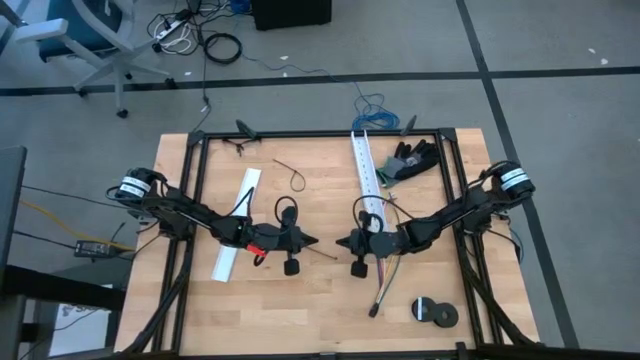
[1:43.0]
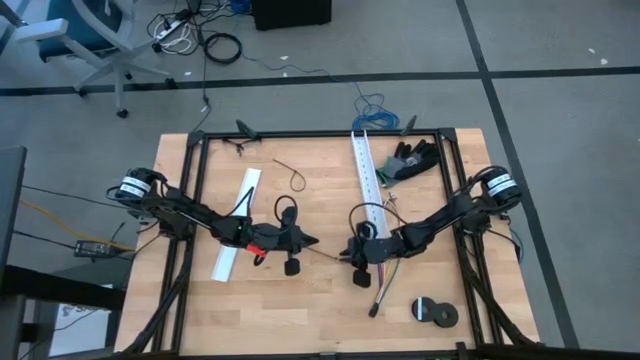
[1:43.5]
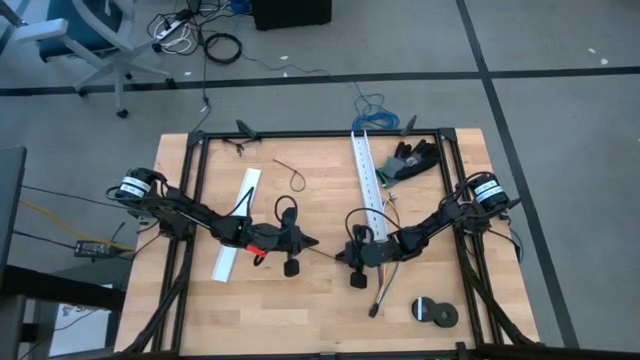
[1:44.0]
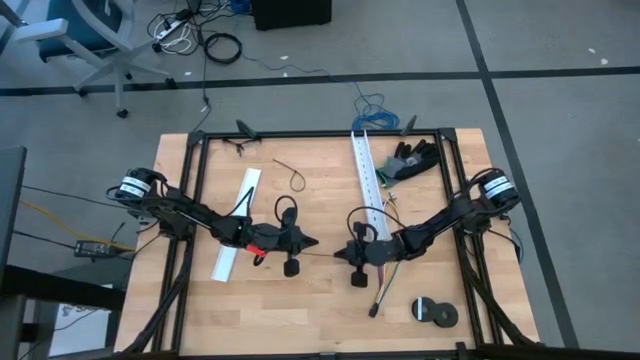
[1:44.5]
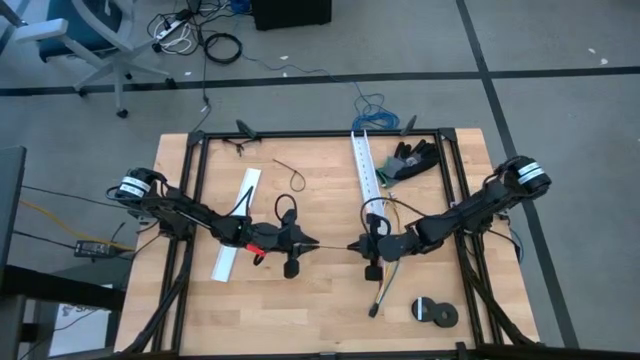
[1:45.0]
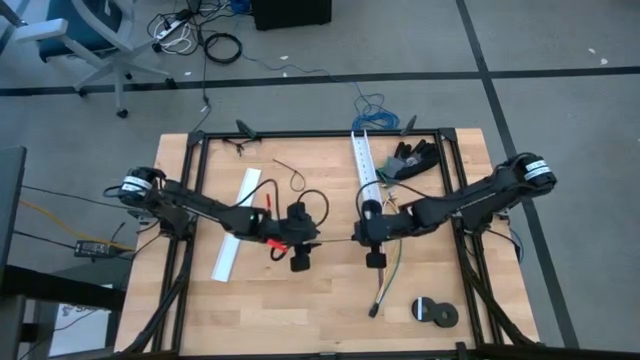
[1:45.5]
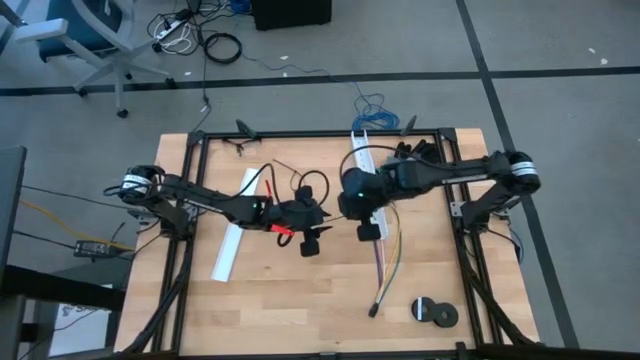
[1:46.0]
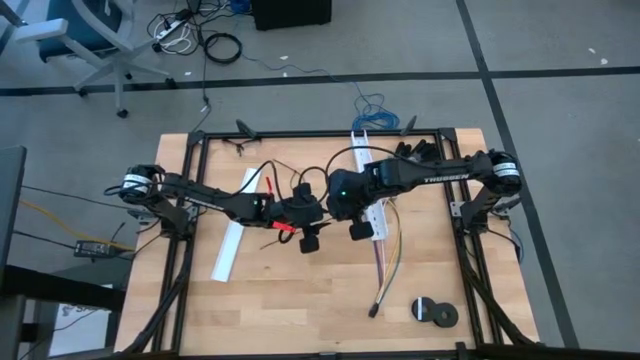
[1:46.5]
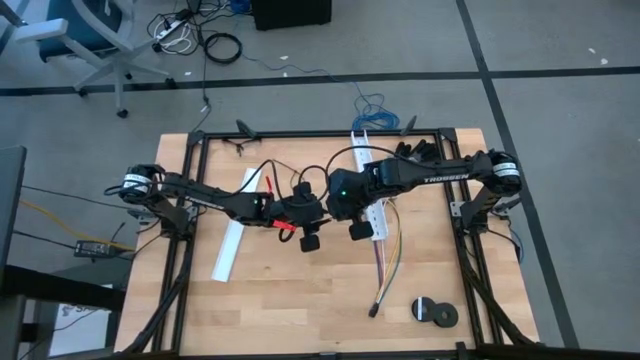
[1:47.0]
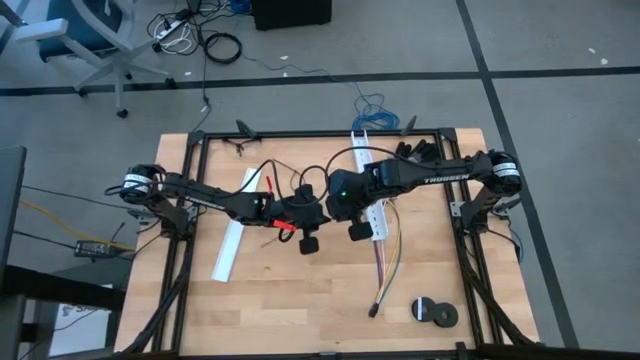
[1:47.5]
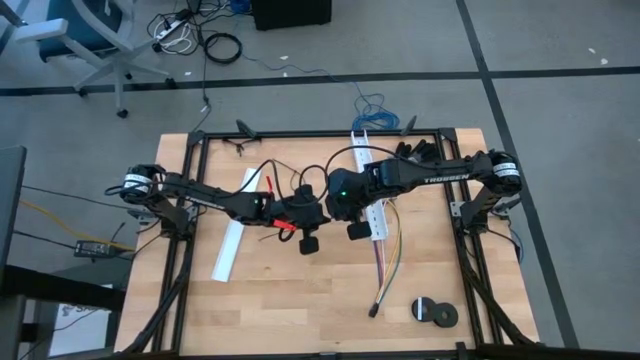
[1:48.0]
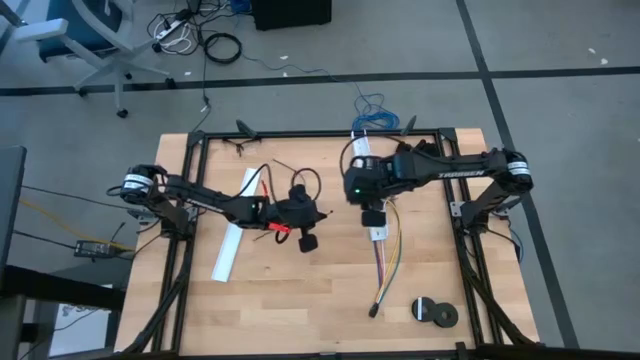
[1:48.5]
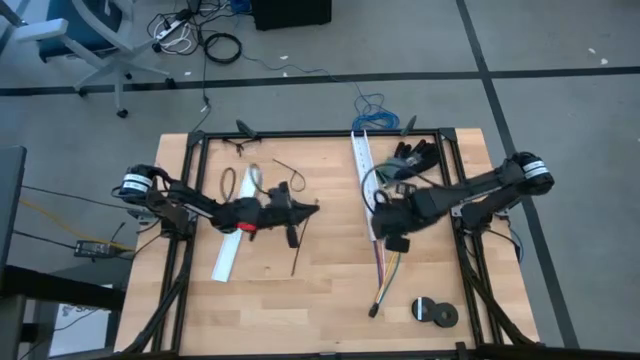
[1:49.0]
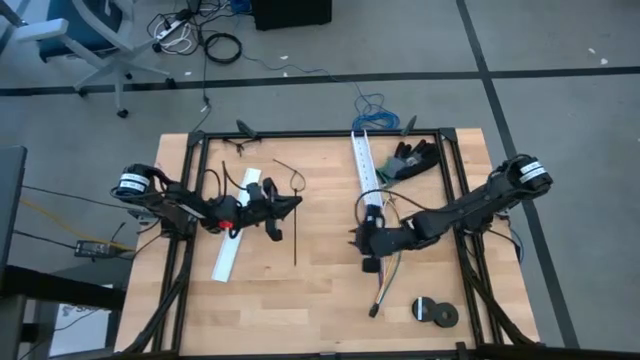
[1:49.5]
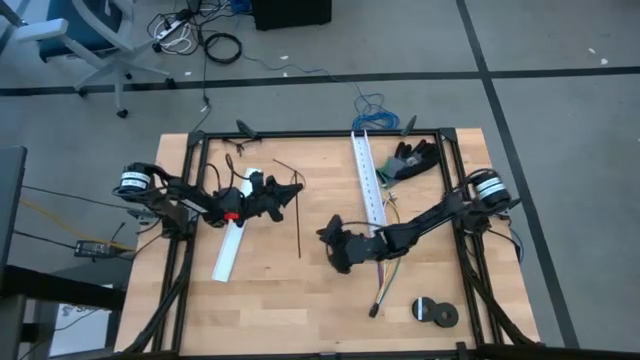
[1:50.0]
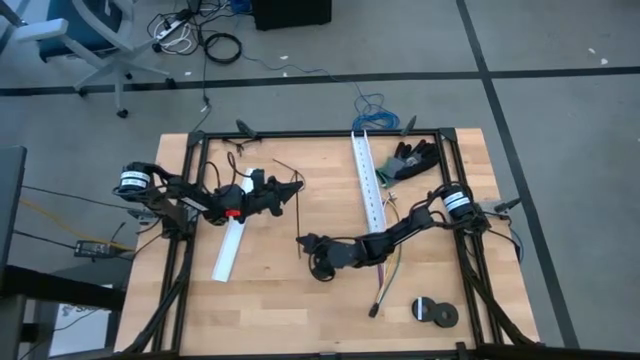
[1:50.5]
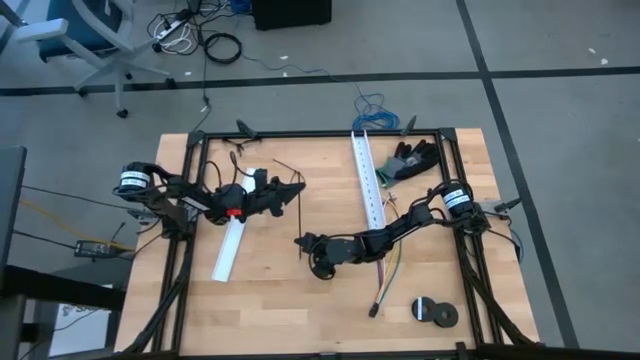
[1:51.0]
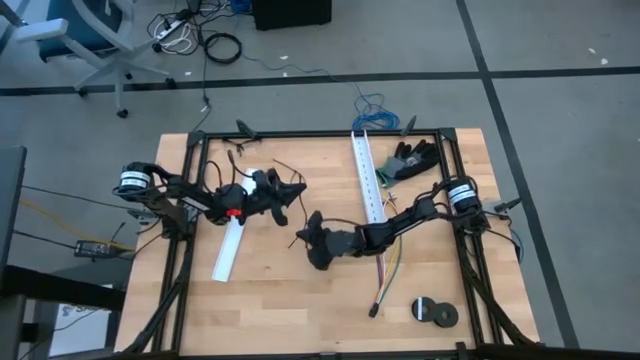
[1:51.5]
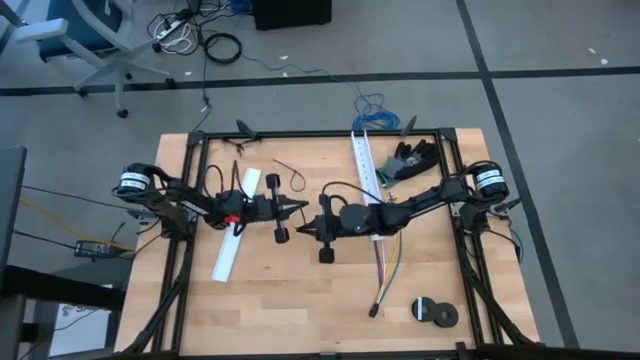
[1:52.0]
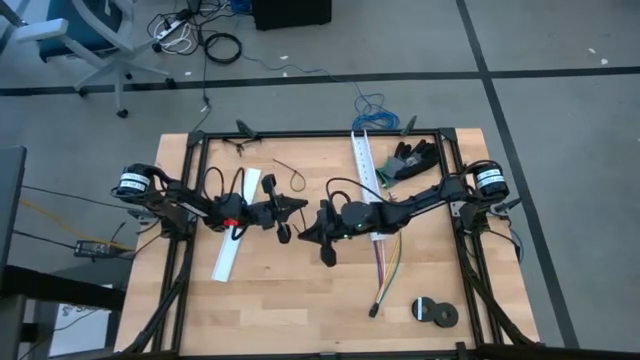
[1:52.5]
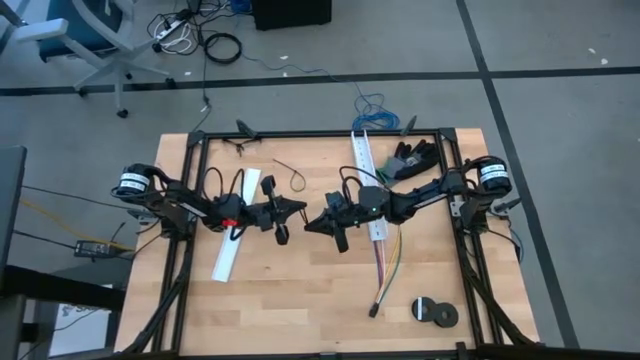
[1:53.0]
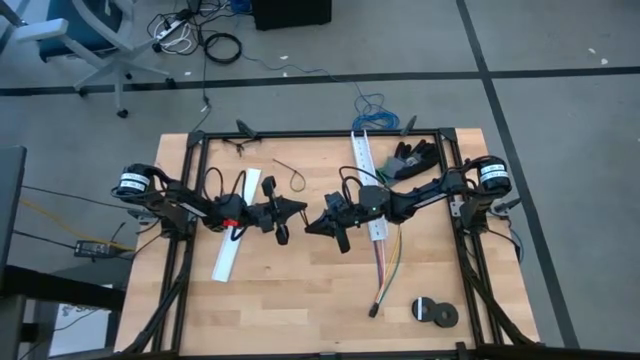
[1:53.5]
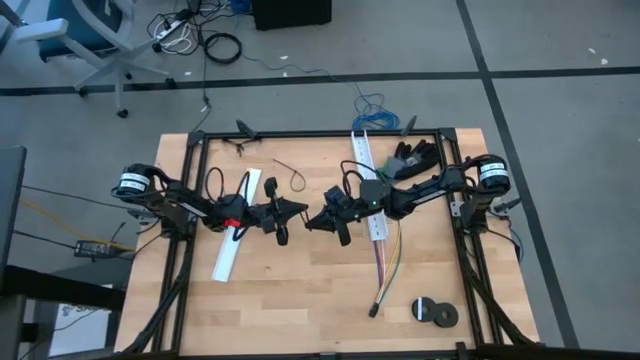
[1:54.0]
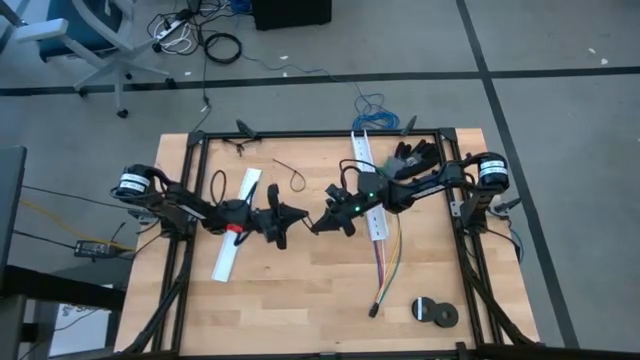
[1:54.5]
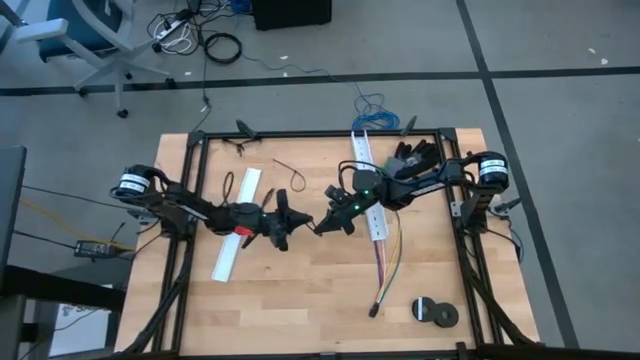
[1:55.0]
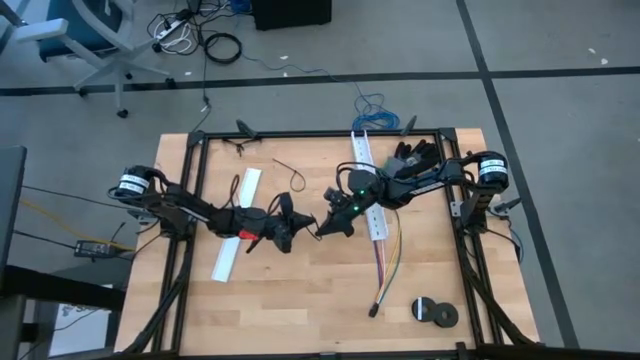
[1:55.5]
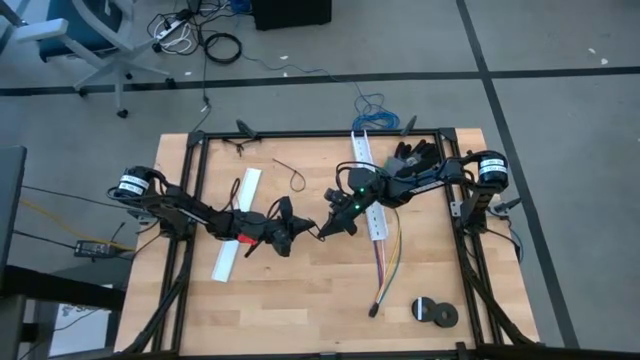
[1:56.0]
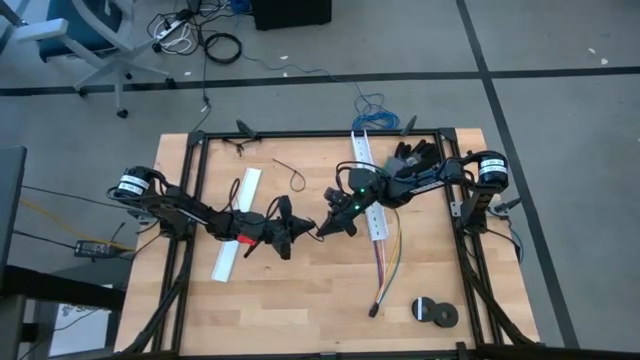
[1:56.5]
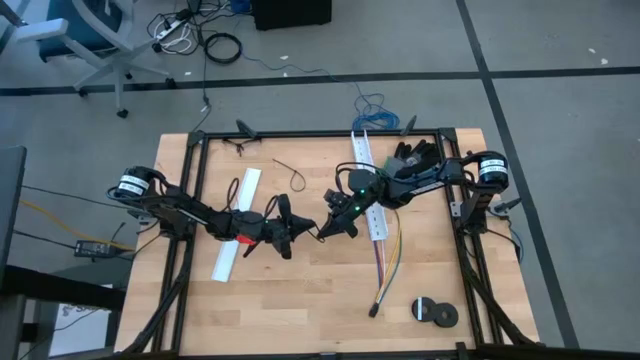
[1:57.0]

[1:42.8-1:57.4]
Task: Ziptie cables
Prepare the black zip tie

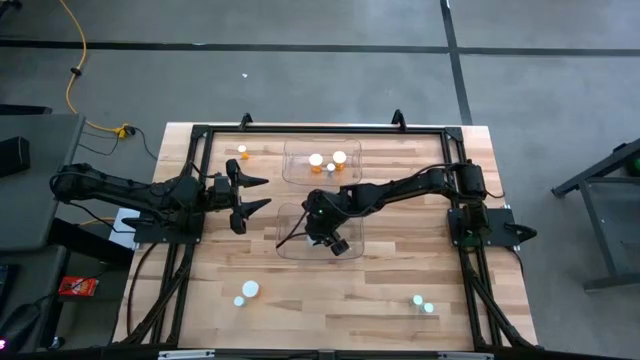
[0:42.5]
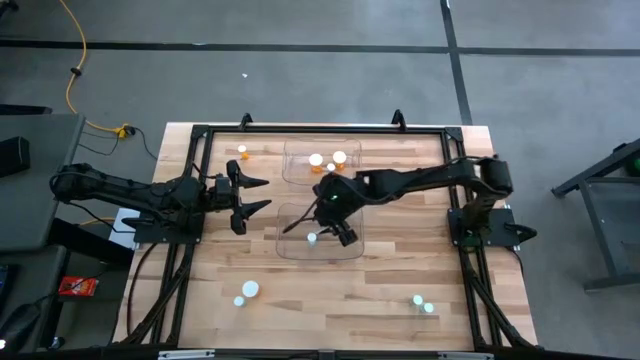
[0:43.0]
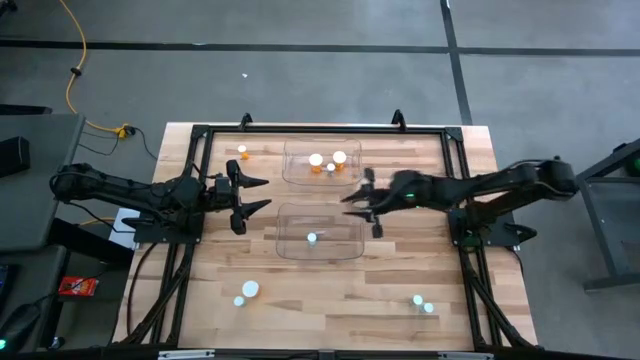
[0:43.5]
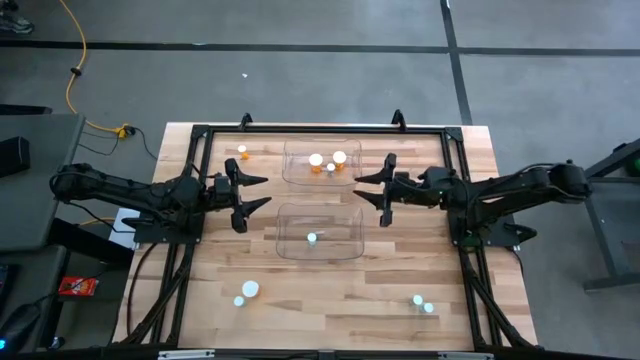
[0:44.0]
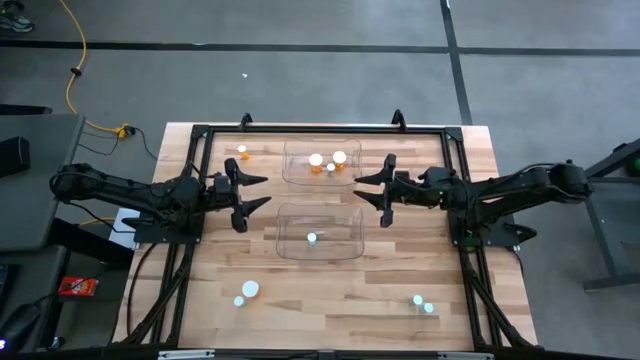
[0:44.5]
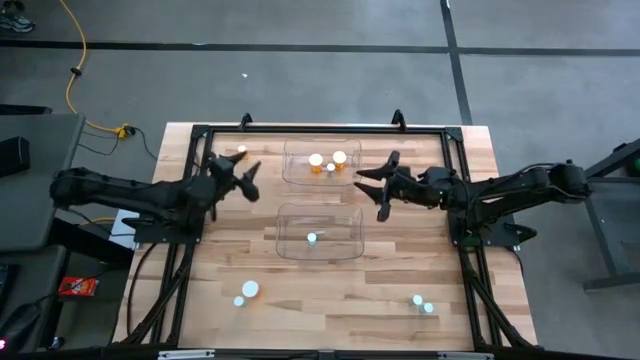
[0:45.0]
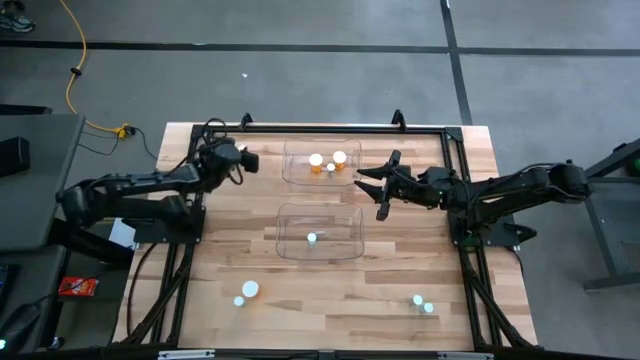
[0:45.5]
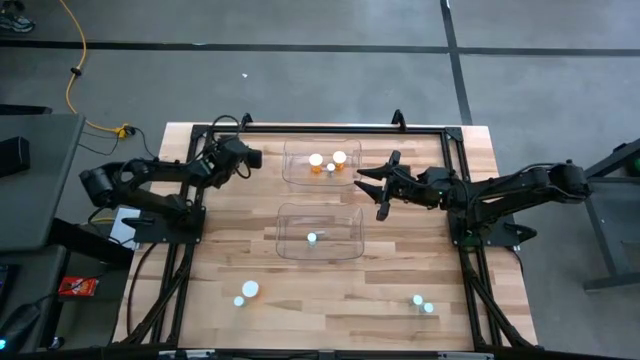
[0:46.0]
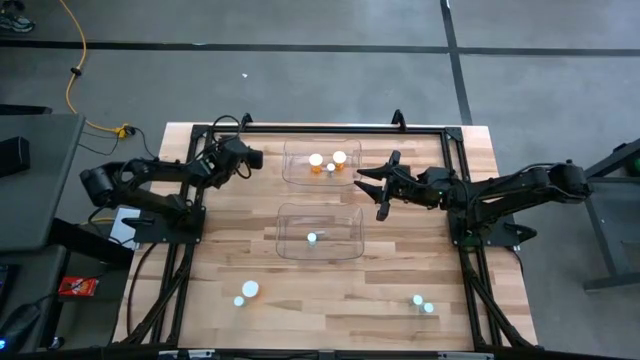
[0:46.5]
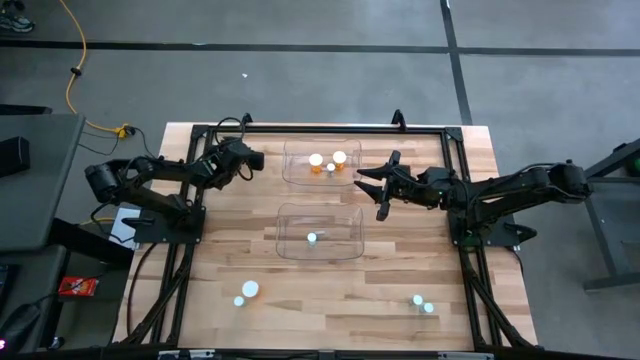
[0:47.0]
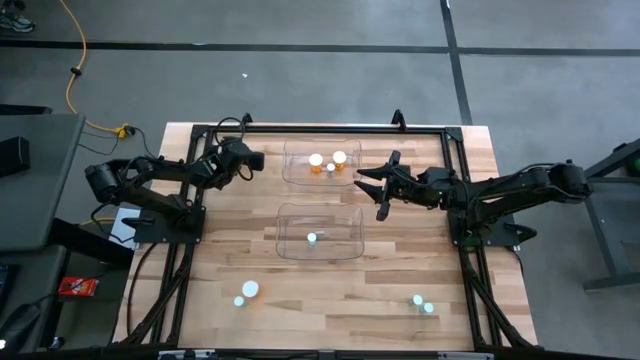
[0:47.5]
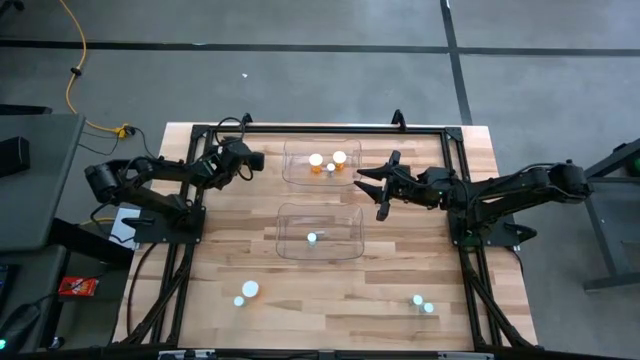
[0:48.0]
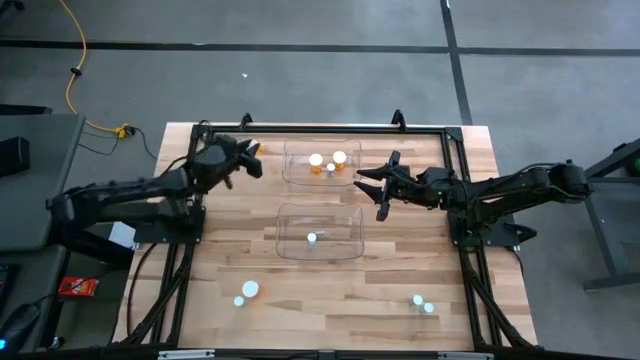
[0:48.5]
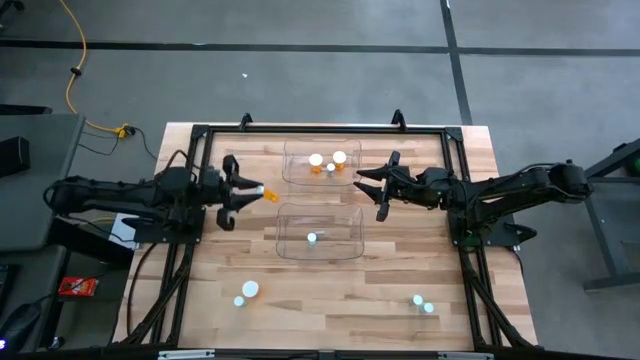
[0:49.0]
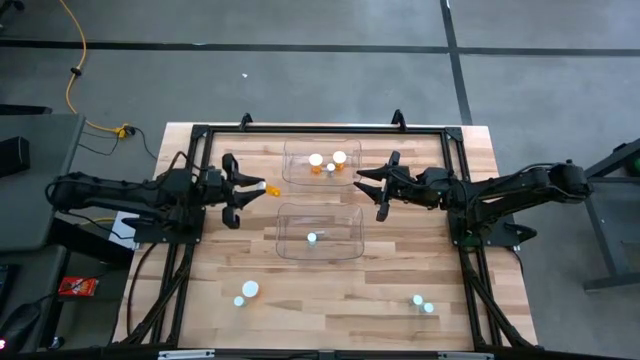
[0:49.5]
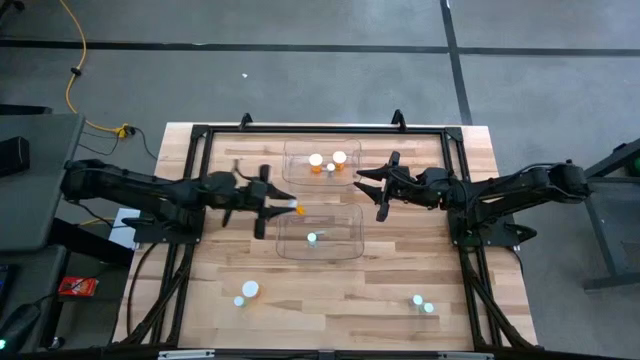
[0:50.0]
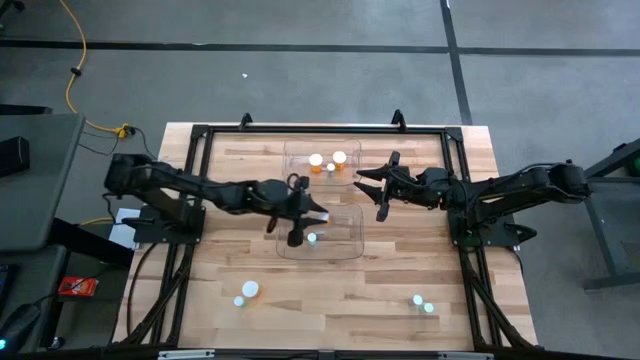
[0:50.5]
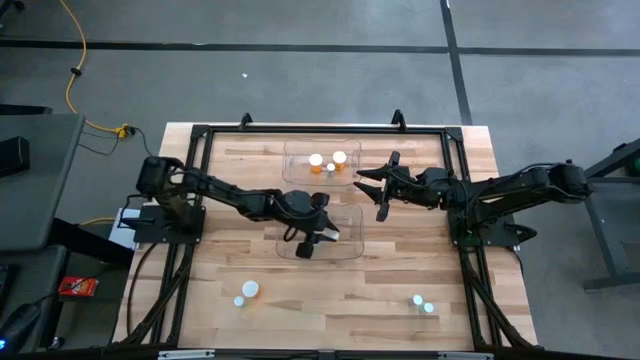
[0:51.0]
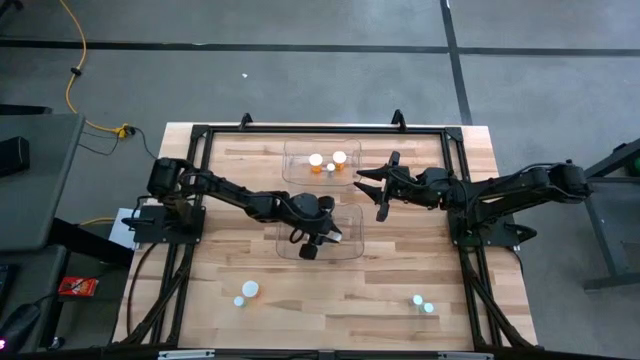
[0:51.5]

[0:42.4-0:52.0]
Task: Pick and place medicine bottles into bin by pill shape (circle, oval)
Put the orange tablet bottle into the bottom transparent bin
